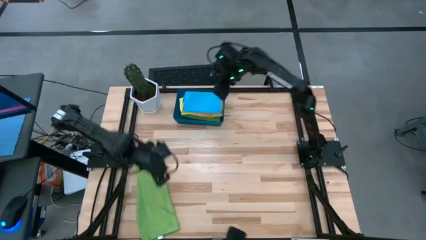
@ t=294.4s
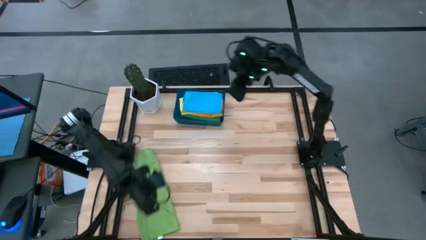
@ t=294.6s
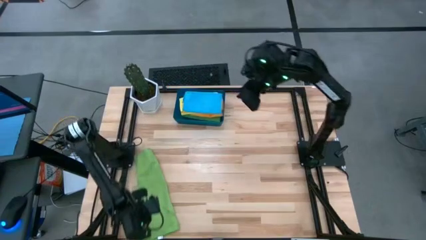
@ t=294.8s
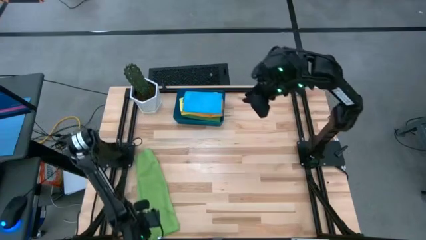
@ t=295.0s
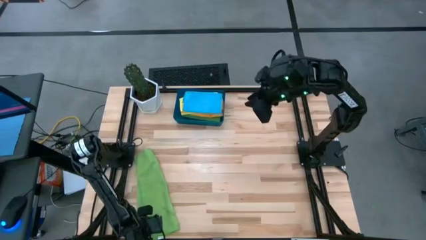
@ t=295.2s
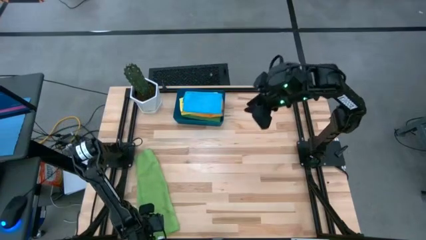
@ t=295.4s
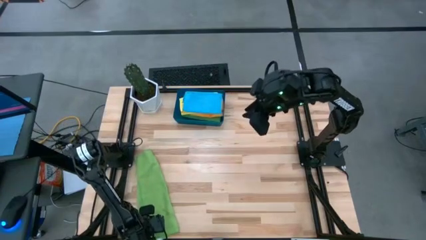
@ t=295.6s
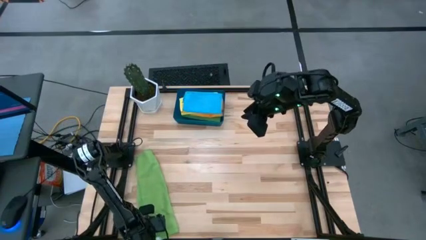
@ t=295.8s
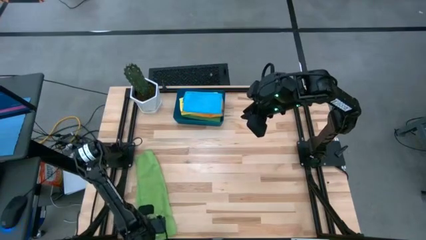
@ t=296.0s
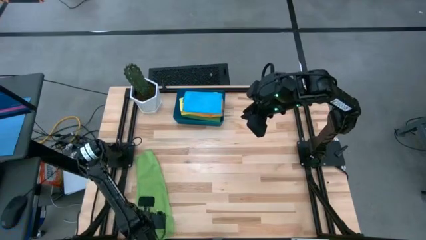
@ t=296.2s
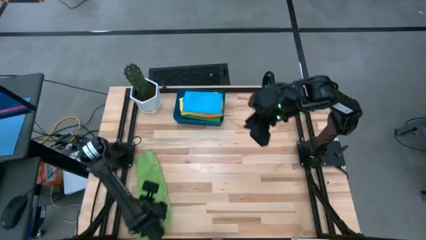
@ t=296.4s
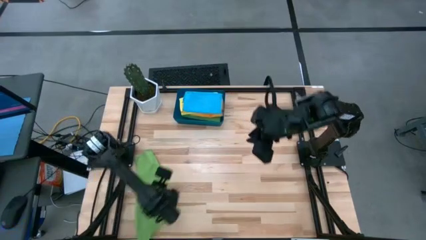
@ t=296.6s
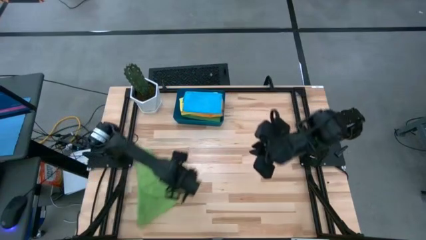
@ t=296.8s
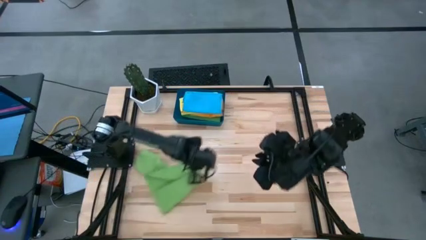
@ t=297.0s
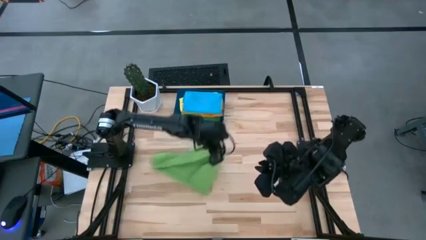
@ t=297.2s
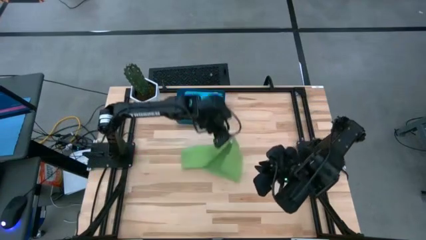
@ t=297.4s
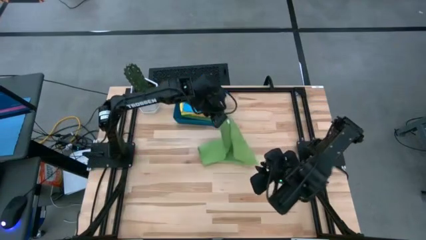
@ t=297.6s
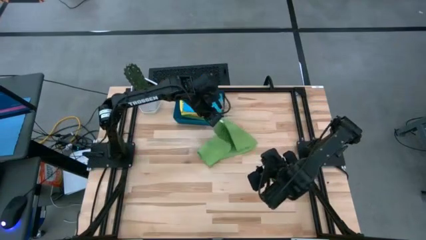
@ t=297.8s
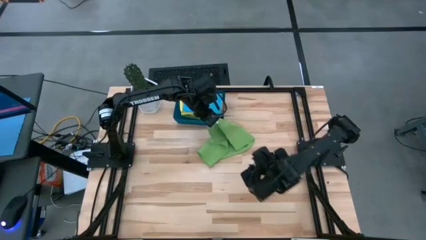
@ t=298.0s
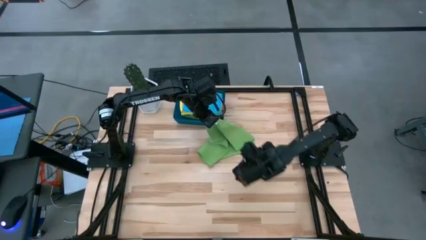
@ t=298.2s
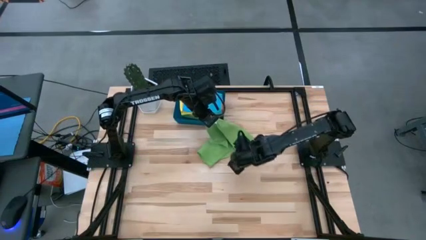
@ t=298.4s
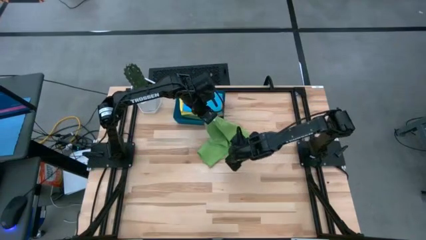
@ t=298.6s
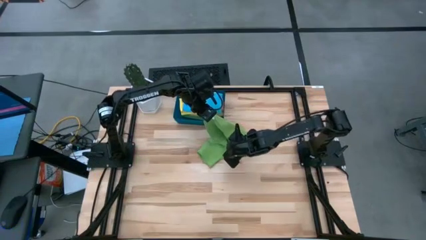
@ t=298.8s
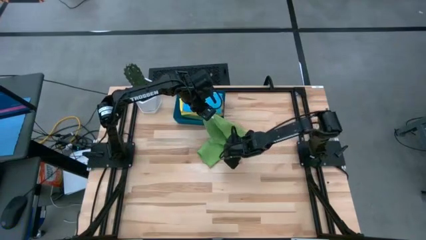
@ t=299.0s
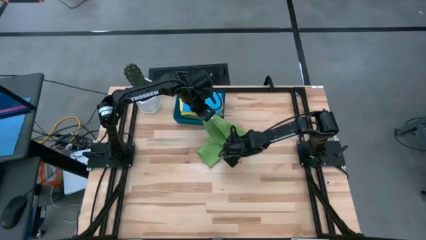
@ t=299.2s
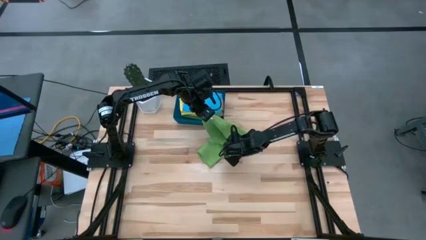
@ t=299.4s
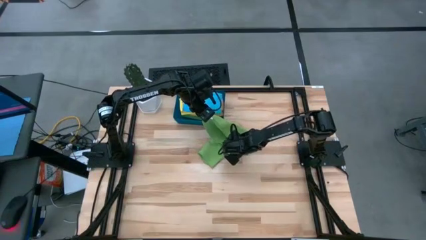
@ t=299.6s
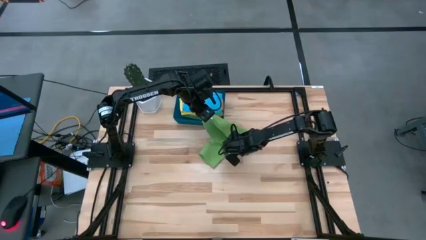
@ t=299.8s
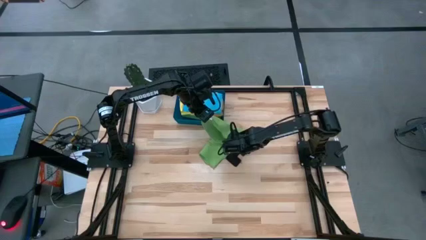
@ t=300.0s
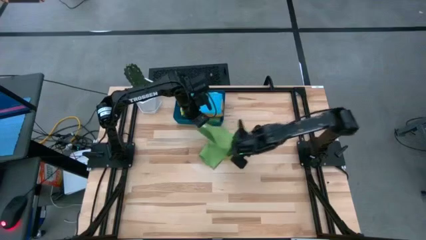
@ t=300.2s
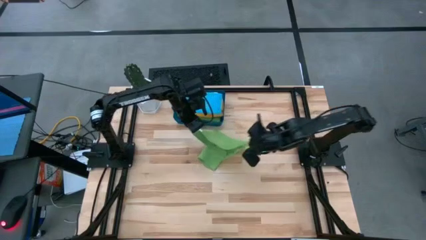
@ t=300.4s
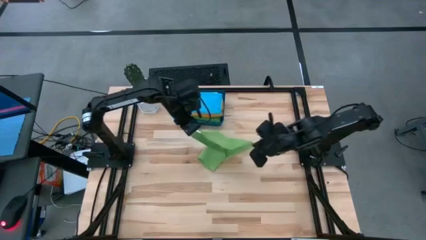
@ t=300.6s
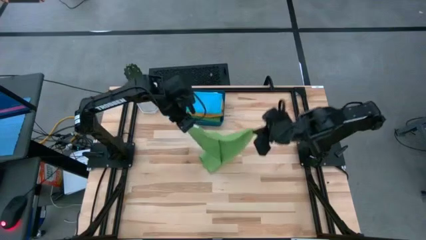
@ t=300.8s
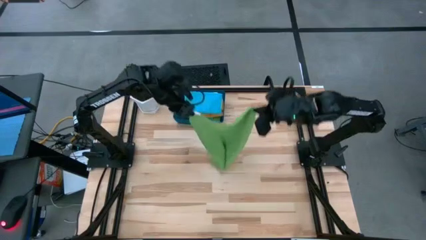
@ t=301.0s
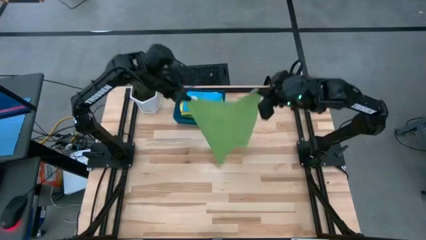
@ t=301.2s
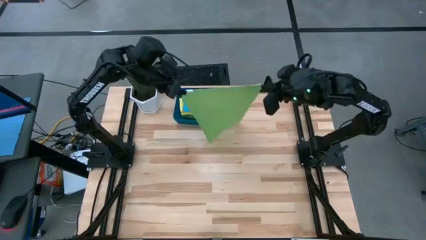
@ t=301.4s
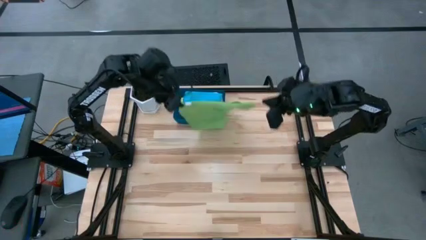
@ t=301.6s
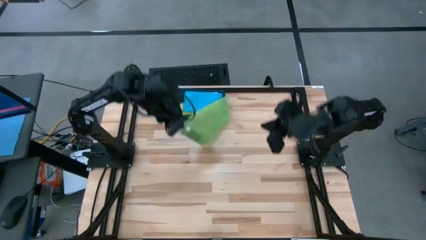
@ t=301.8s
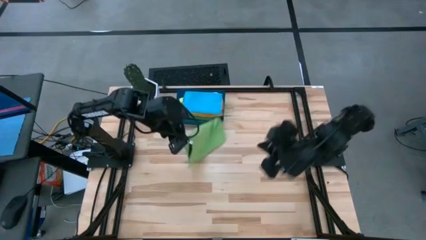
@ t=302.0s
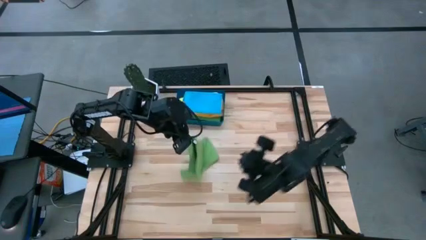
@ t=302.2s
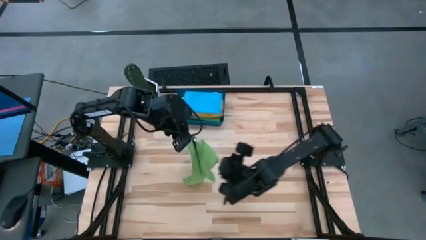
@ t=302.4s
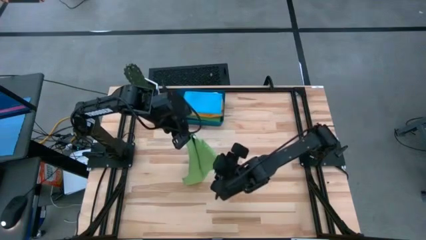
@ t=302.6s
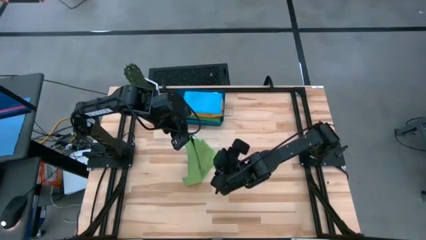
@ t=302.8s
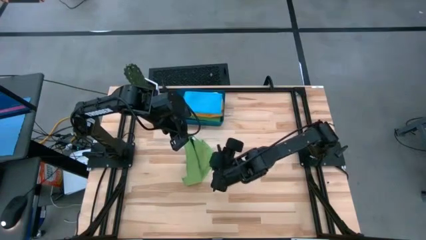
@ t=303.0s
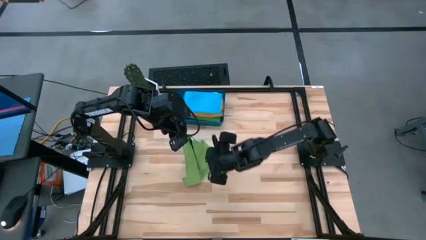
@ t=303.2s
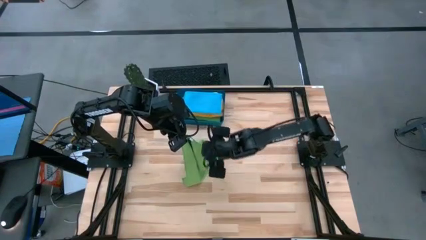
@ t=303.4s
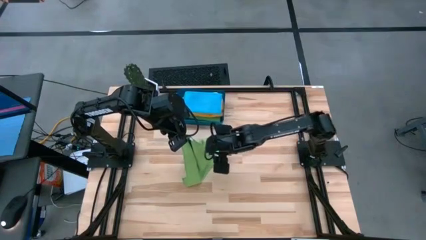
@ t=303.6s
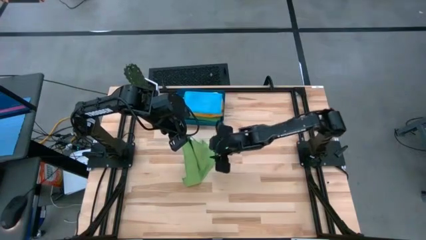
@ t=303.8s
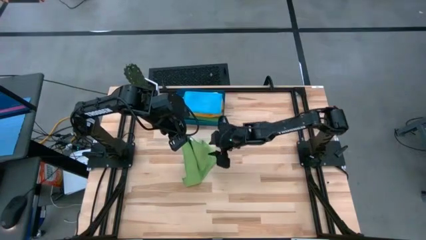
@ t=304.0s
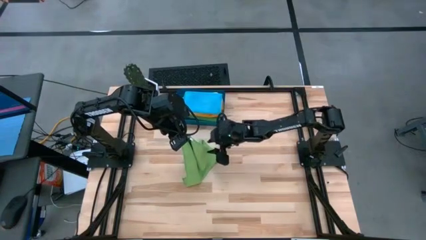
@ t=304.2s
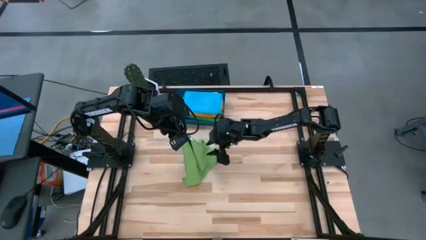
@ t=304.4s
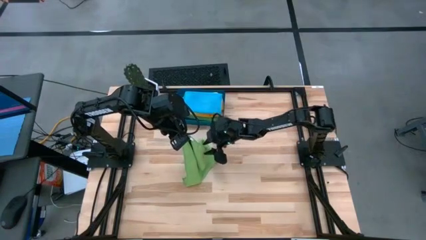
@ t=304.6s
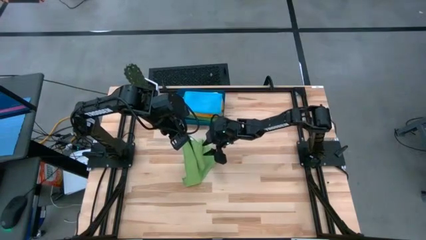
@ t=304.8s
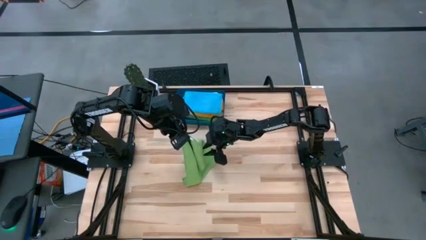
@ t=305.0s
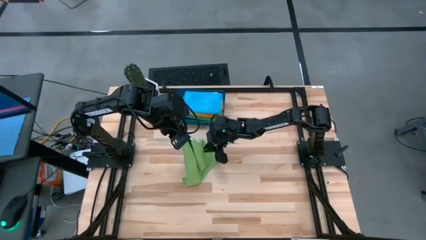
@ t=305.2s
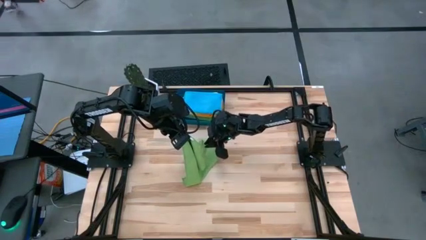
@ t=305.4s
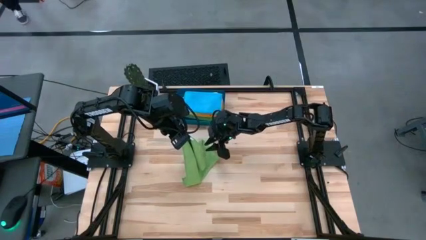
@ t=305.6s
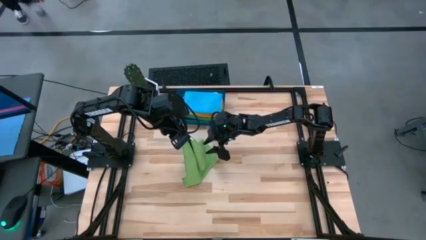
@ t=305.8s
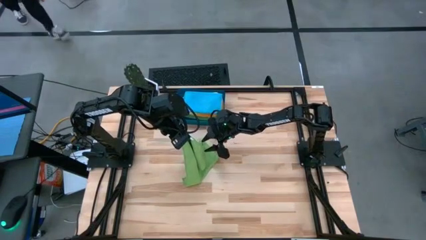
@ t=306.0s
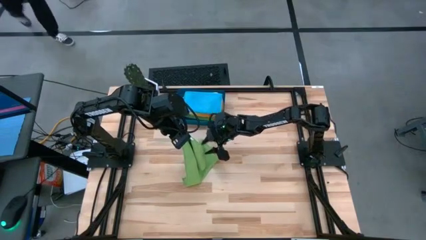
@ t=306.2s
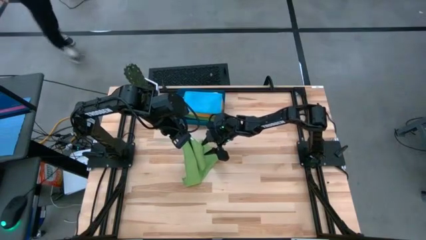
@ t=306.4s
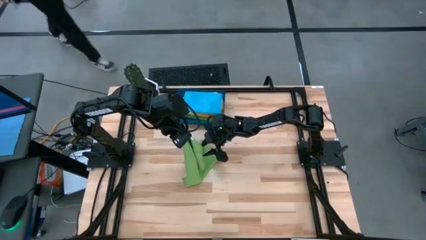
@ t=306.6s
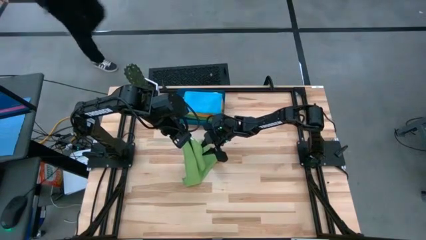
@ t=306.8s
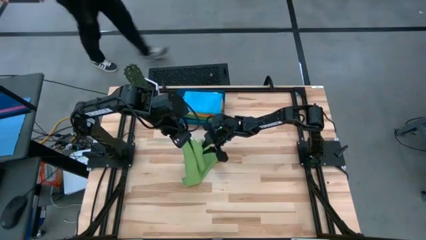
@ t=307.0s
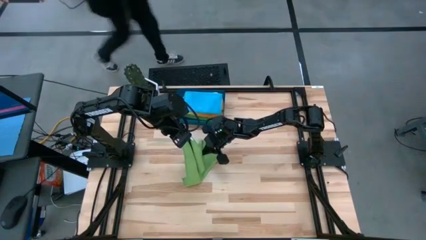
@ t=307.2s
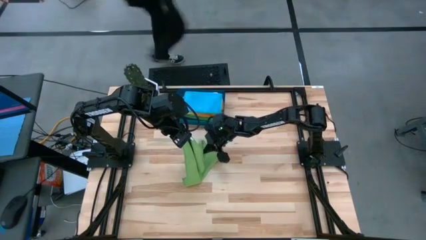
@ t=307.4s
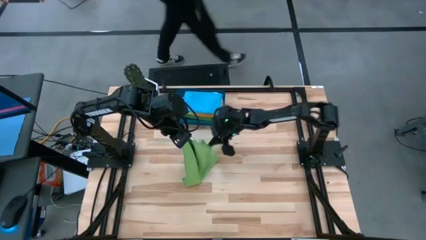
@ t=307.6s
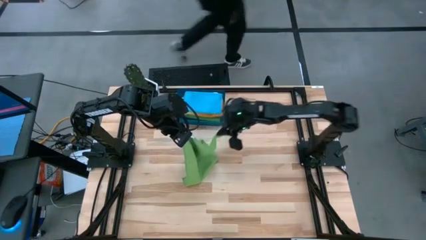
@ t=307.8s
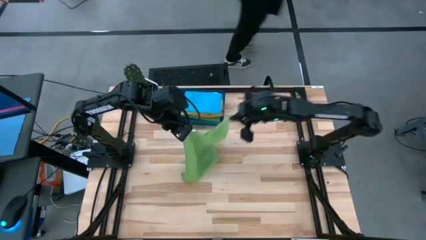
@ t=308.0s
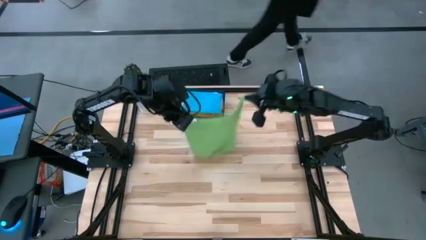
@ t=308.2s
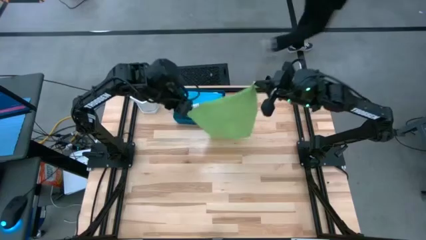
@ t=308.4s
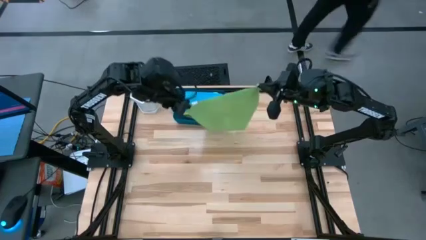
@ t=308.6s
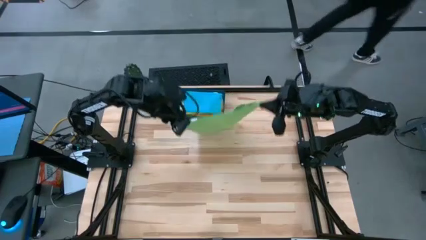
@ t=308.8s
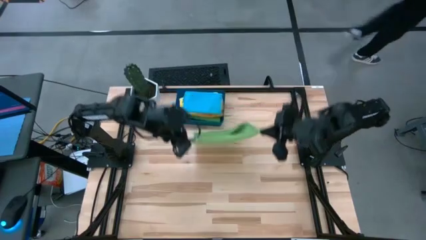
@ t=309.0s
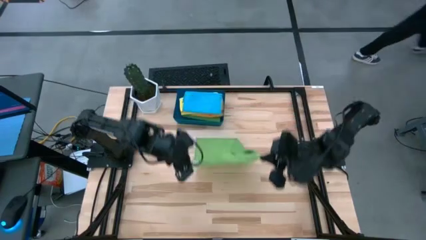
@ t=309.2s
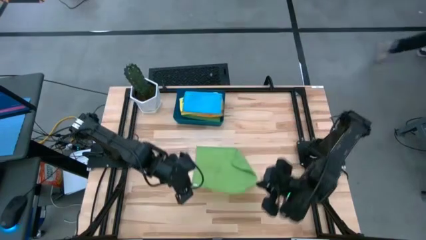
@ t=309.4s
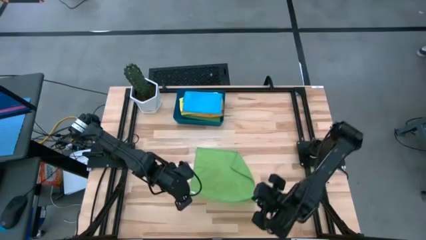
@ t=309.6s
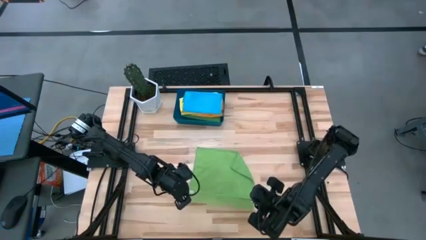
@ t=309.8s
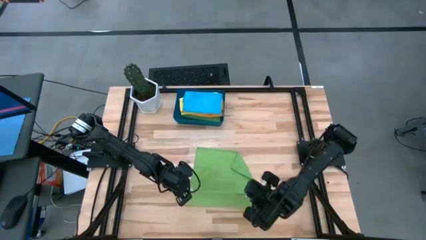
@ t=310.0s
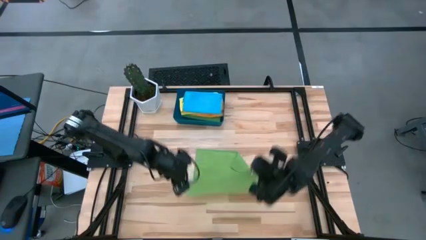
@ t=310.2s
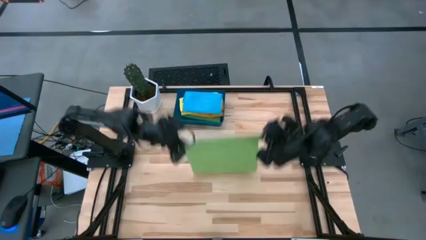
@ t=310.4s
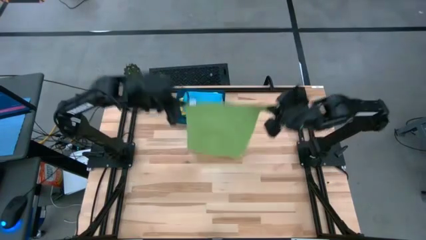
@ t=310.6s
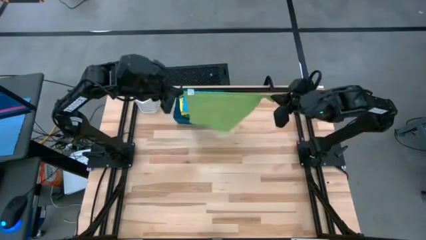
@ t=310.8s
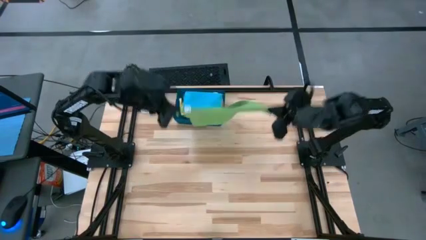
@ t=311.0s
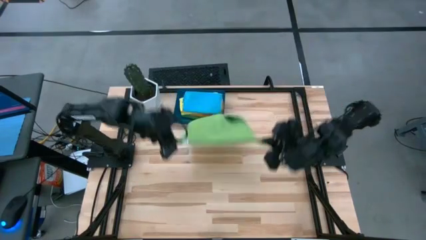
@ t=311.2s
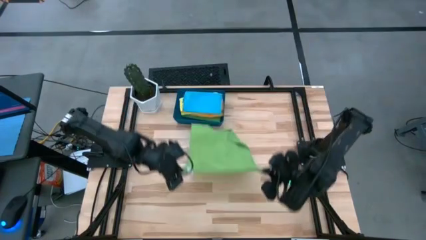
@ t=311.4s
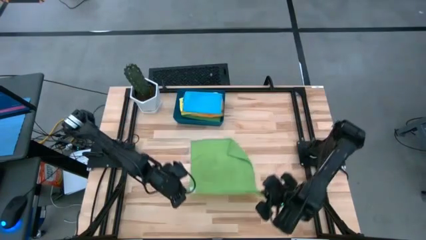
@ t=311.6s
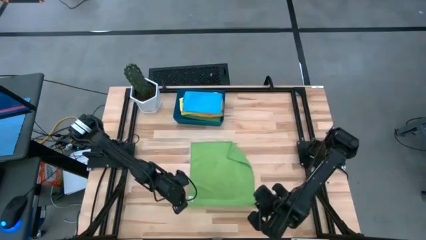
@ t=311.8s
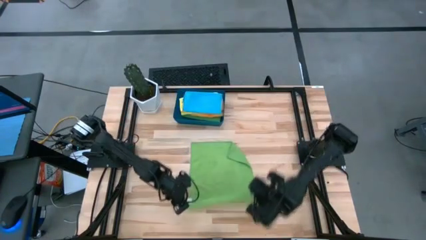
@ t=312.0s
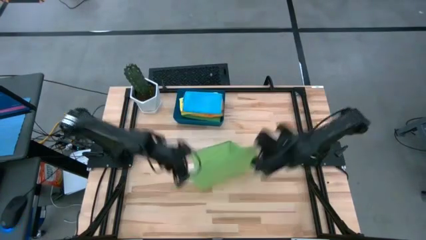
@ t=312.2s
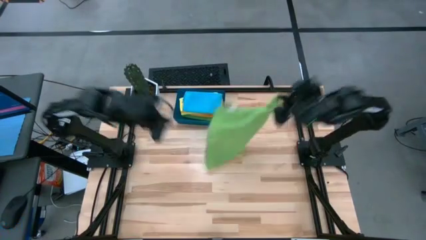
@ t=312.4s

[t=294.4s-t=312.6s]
Task: Fold microfiber towels
Fold the green towel
